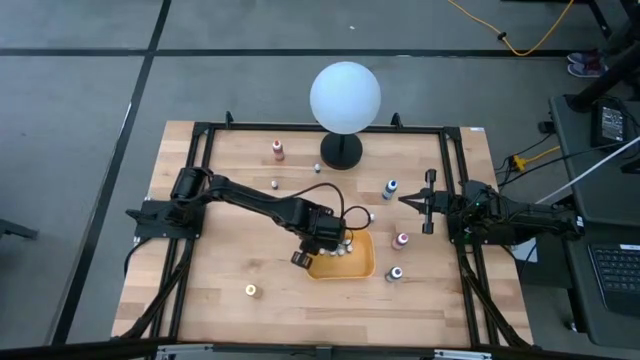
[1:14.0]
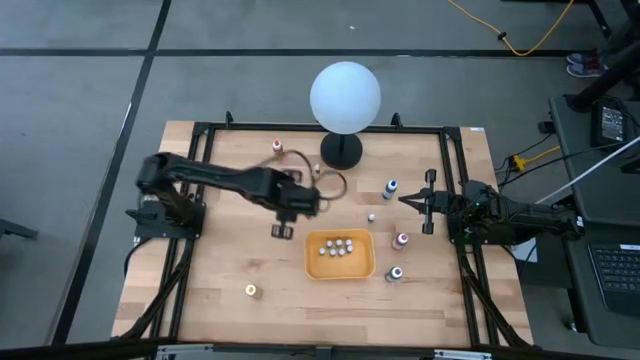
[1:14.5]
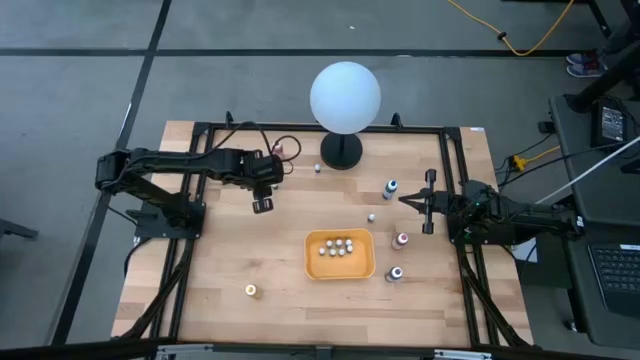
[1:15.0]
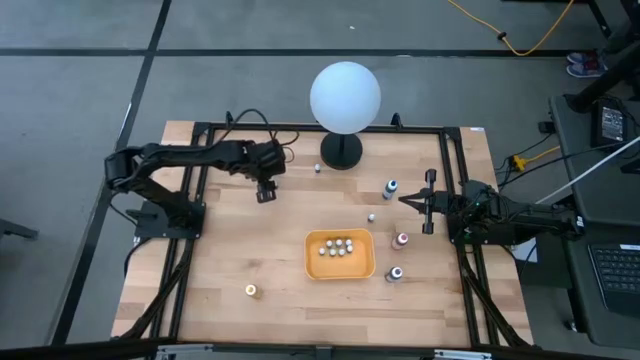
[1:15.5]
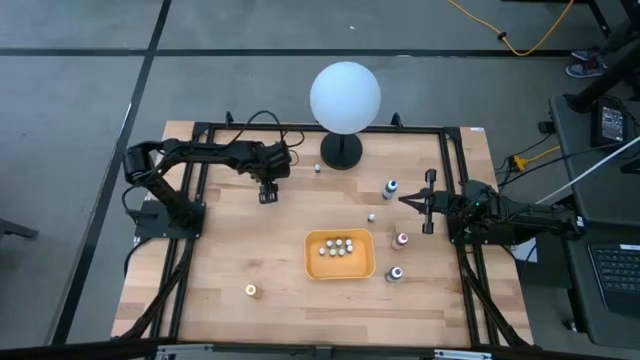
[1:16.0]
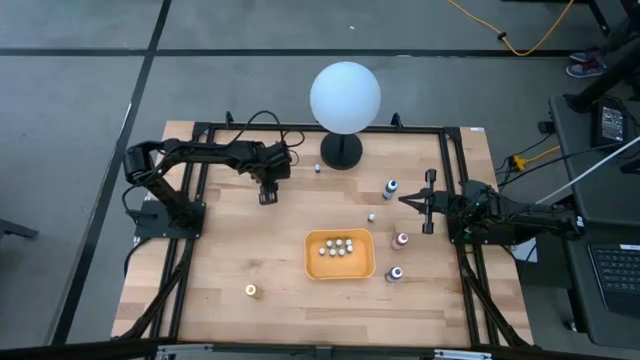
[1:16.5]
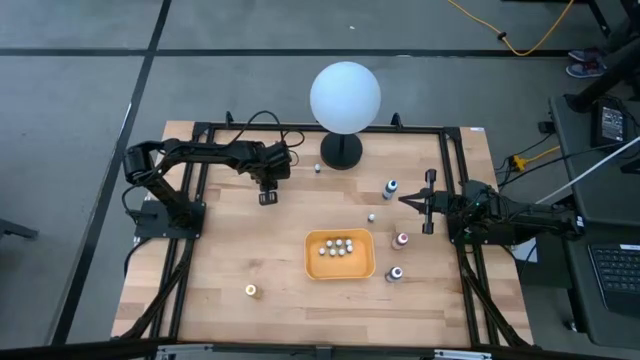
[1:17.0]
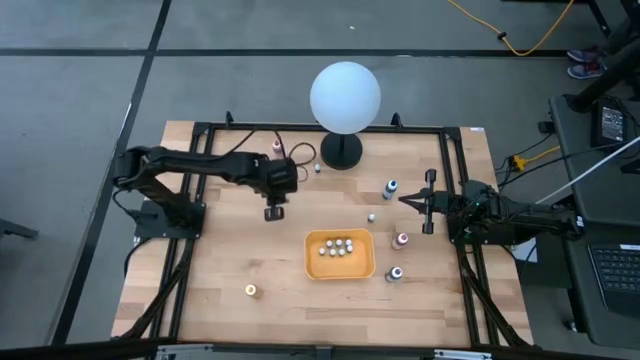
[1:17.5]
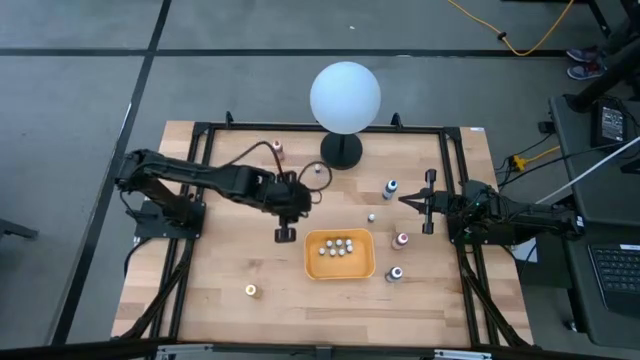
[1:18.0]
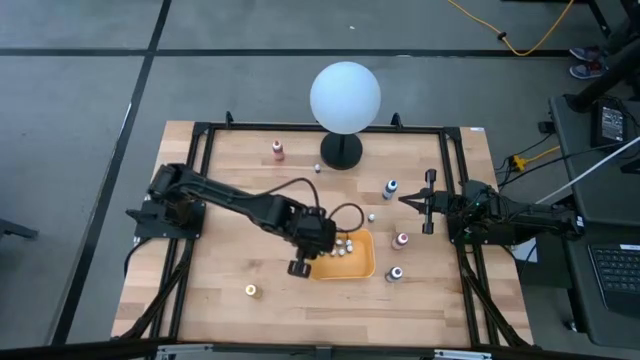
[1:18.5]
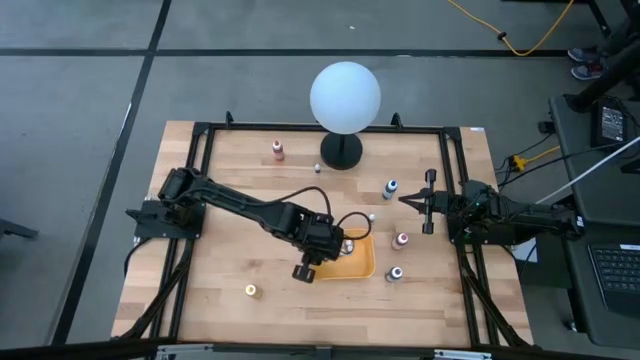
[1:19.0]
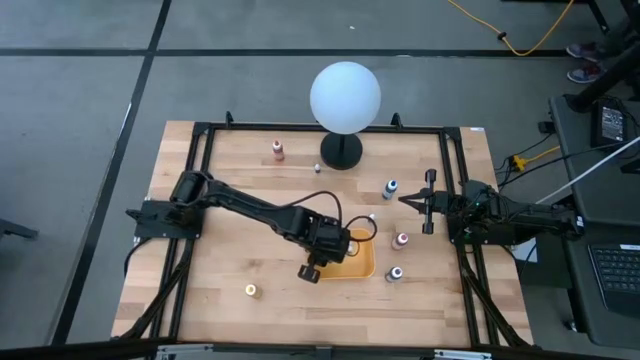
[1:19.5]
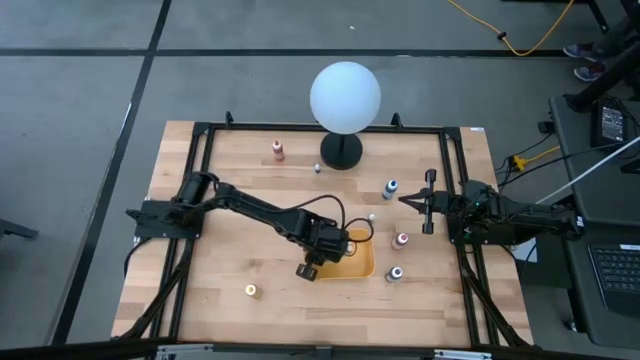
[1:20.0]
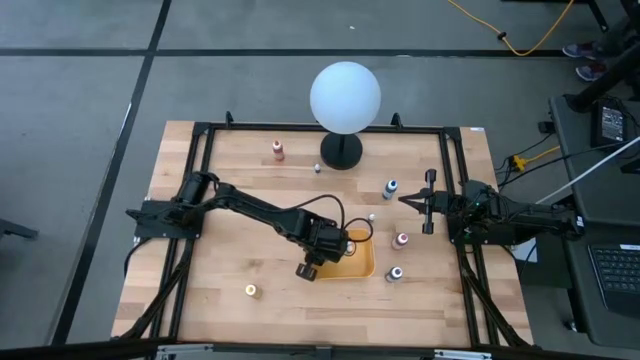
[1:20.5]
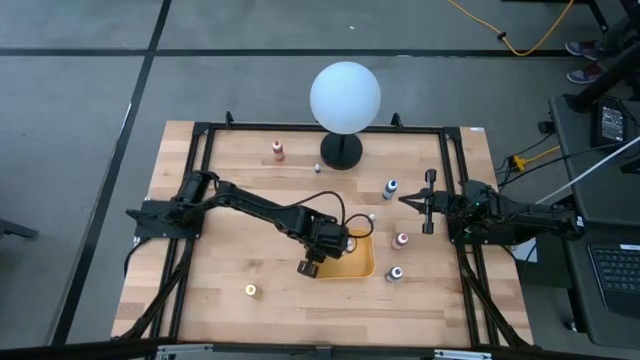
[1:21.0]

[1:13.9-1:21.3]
Task: Pick & Place food coloring
Put the small brown food coloring bottle into the yellow bin

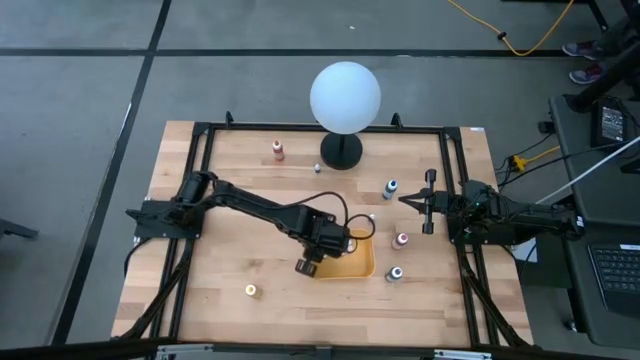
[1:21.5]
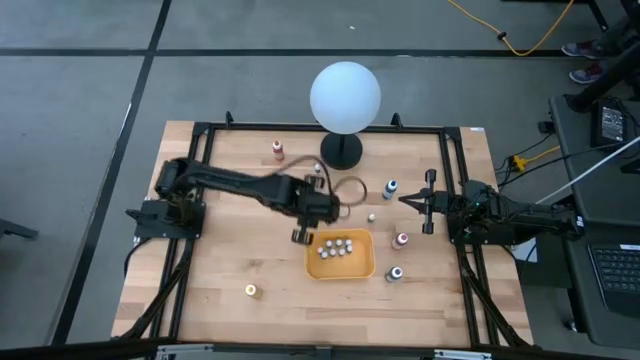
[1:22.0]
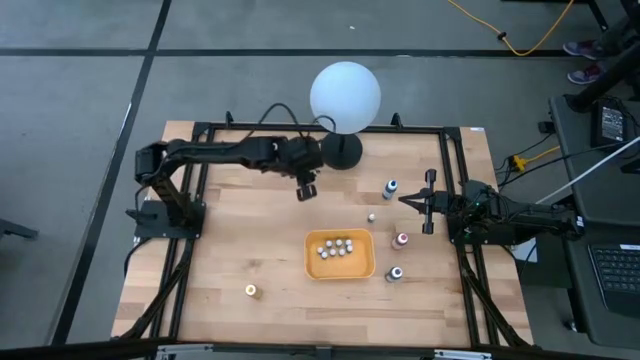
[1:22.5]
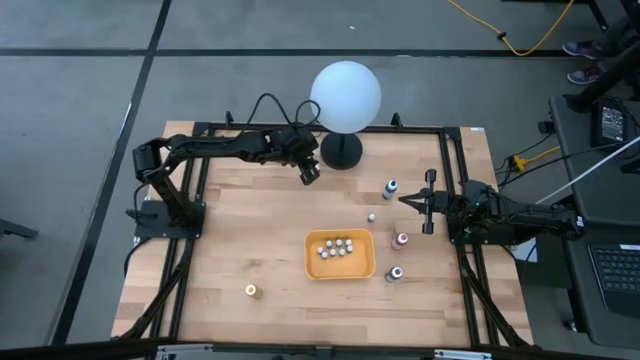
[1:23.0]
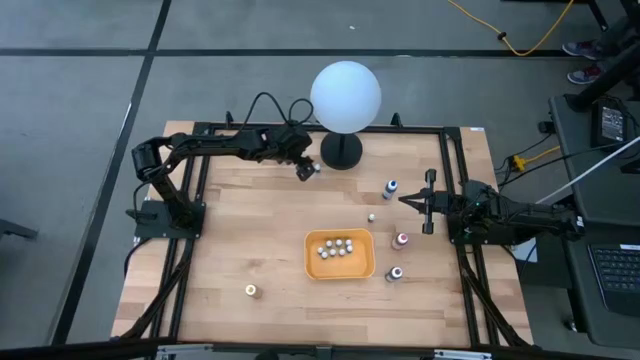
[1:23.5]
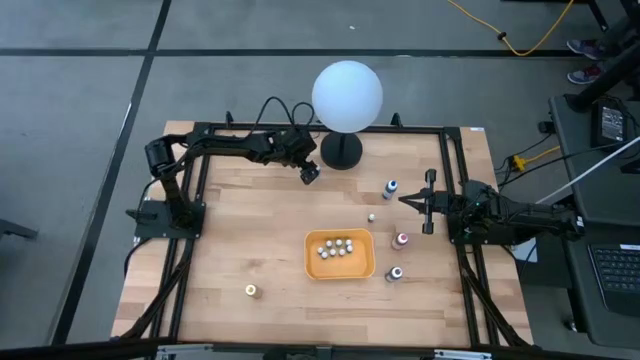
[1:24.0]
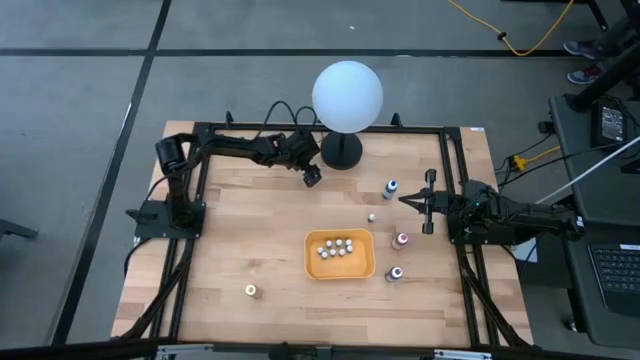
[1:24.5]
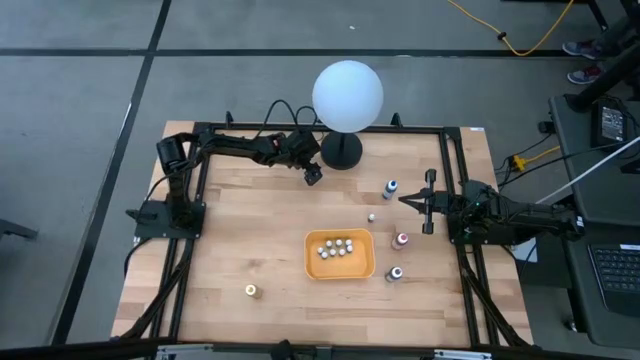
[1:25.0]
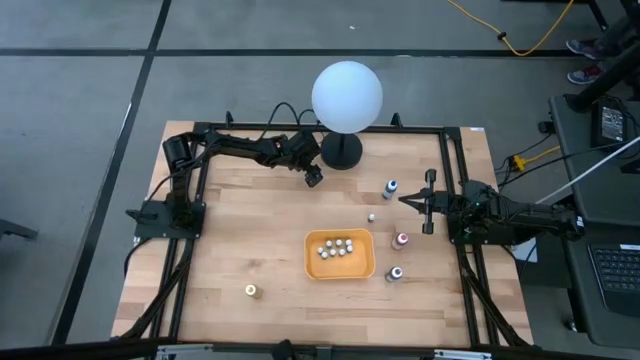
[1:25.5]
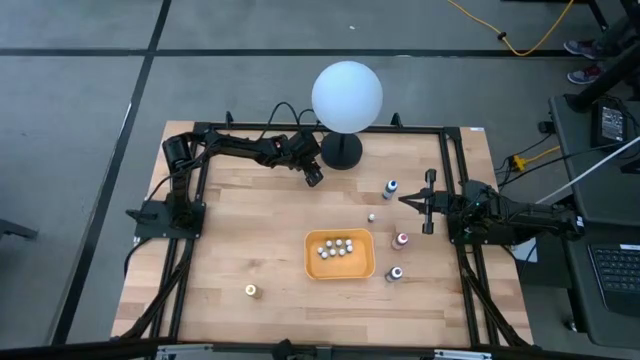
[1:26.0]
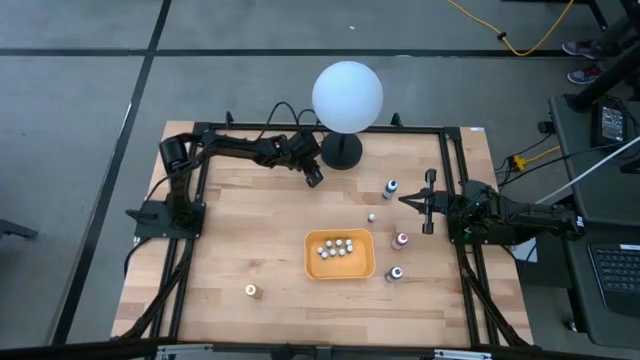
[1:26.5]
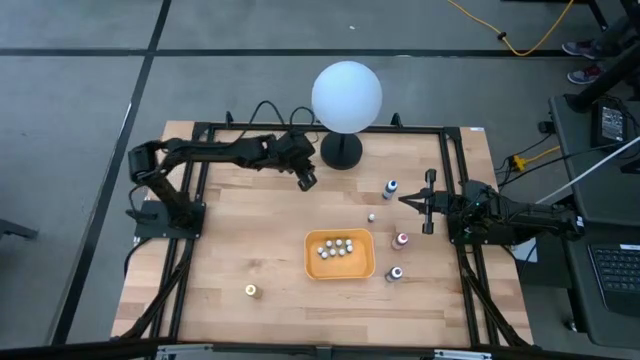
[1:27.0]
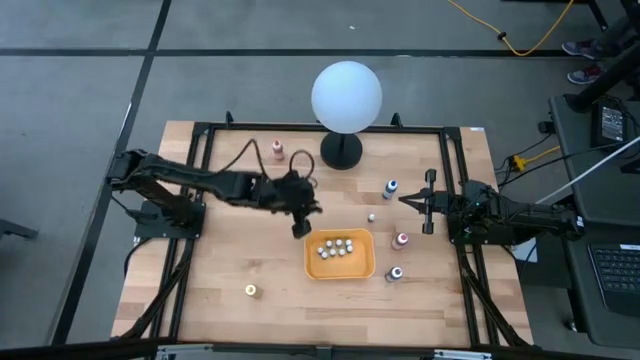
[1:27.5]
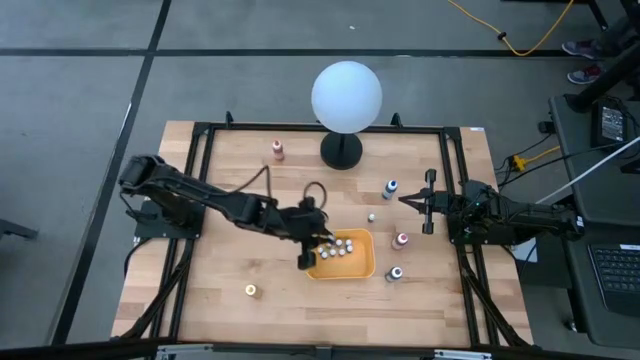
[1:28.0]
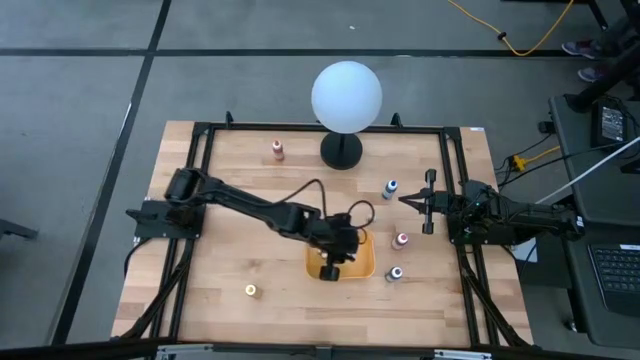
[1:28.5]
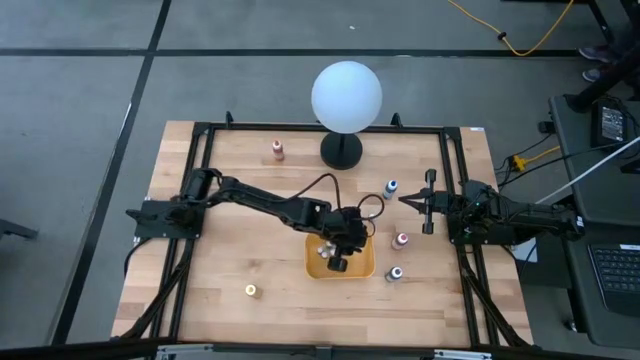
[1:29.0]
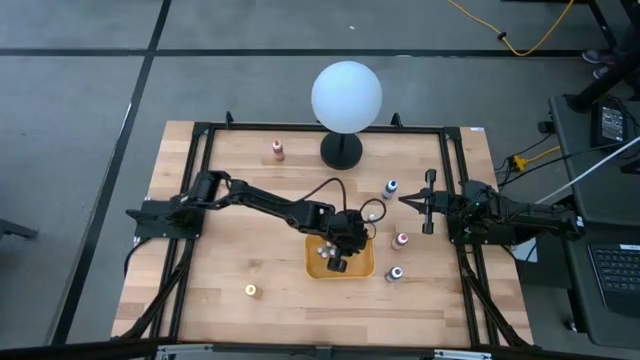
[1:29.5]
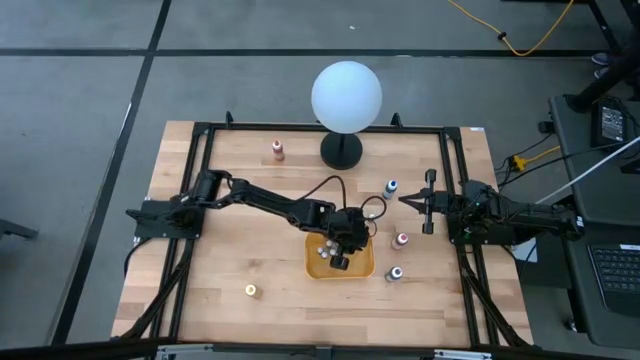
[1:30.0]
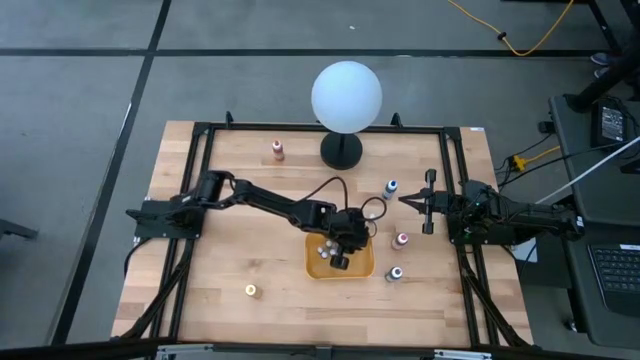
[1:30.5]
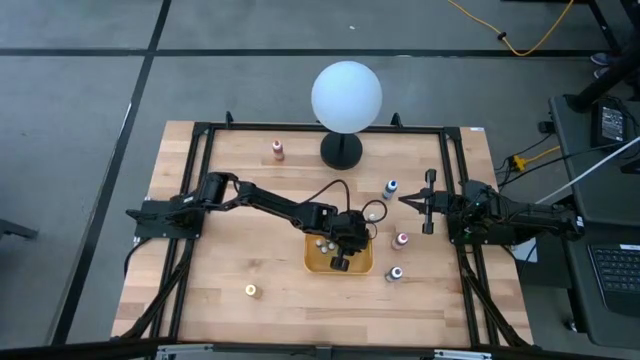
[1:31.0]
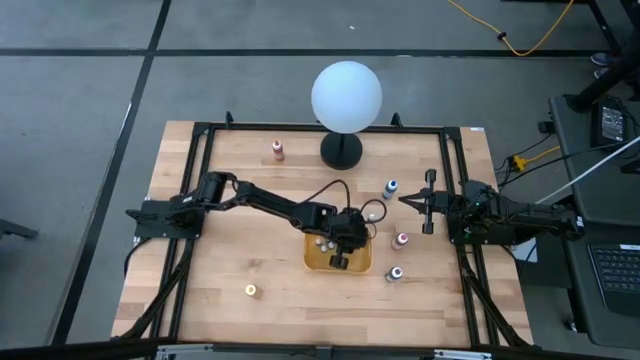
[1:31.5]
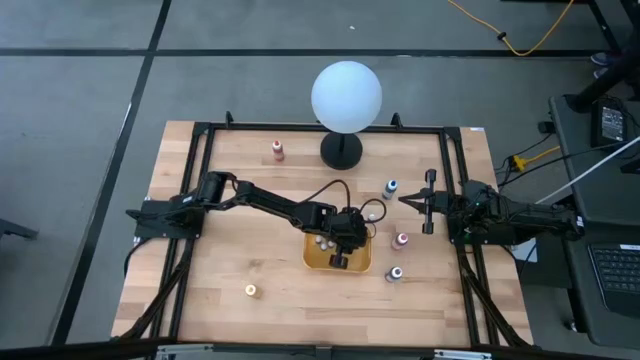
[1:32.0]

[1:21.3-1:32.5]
Put the small purple food coloring bottle into the yellow bin

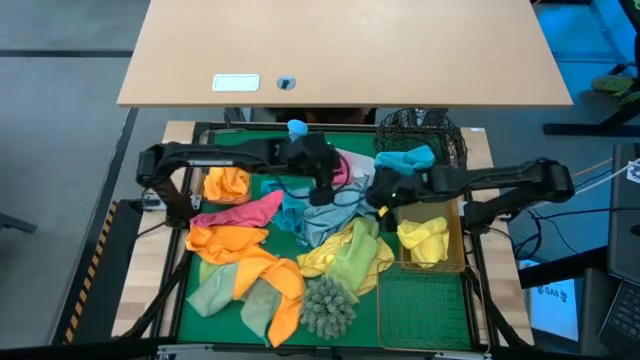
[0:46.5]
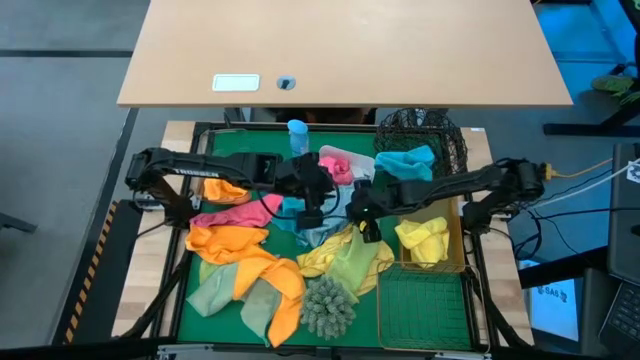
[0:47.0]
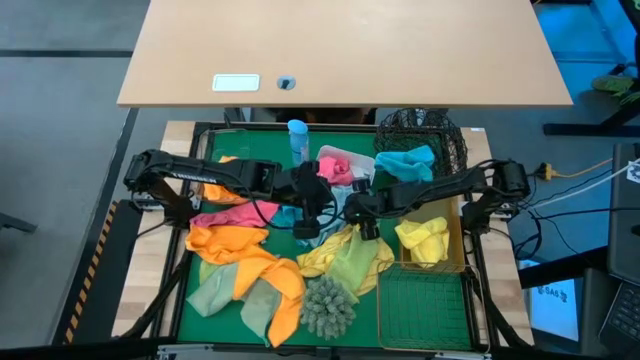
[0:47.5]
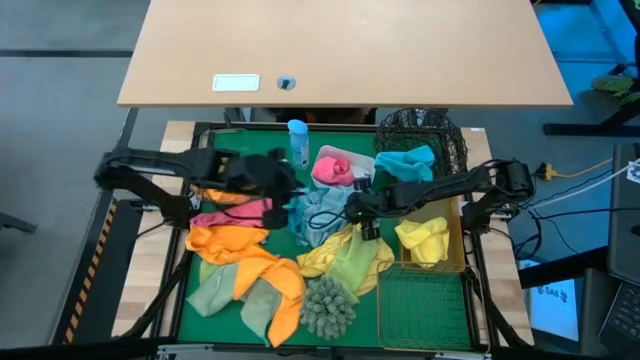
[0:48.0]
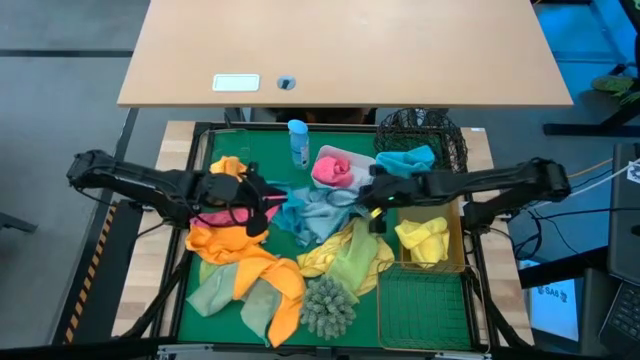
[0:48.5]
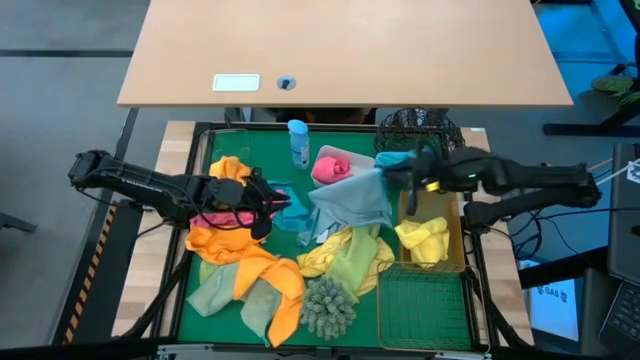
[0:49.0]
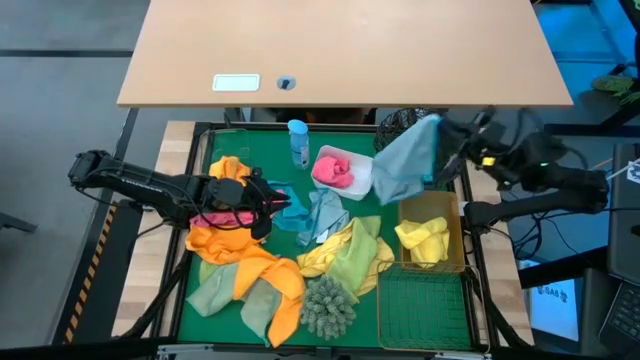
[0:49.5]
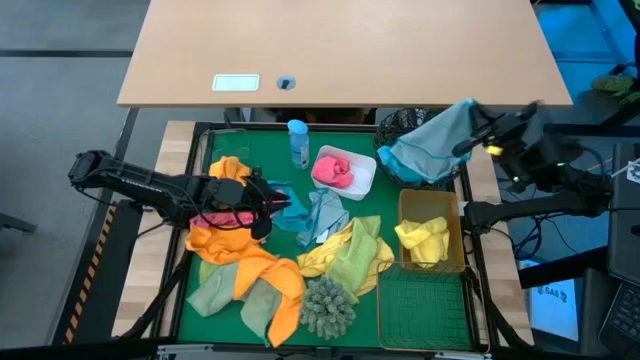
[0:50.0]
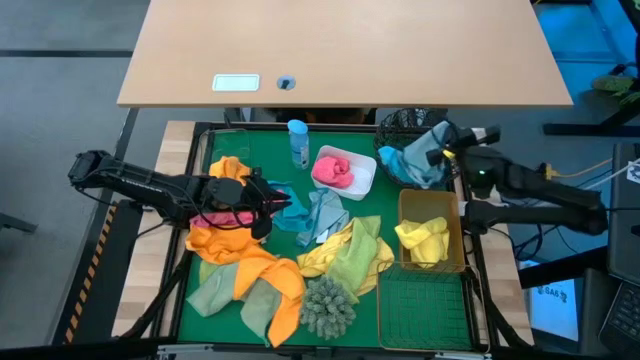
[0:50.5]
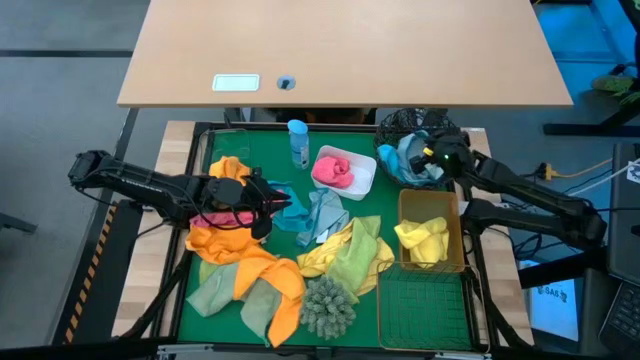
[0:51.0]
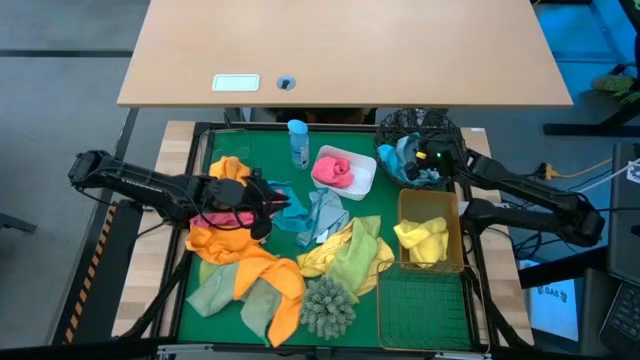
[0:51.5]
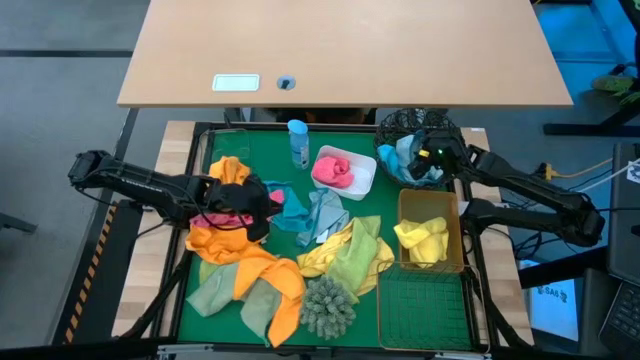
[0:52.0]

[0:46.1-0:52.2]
Task: Sort microfiber towel by color & place in baskets
Put the blue microfiber towel into the circular wire basket
